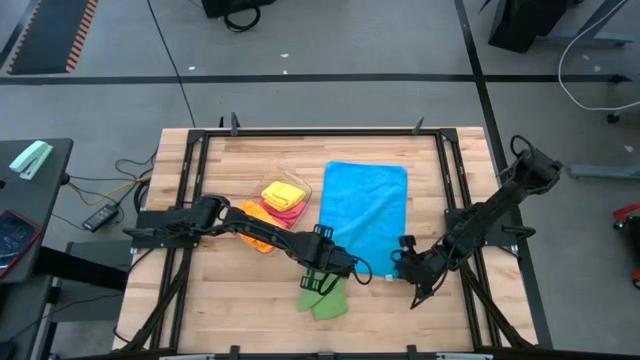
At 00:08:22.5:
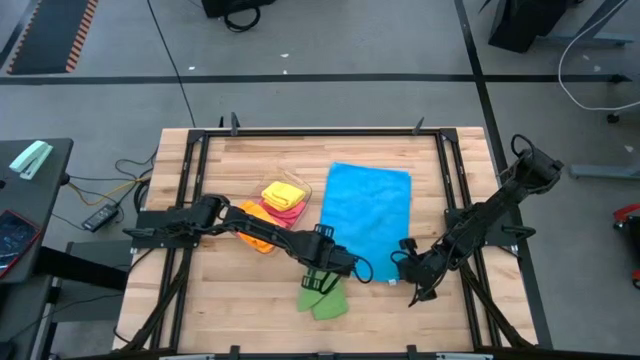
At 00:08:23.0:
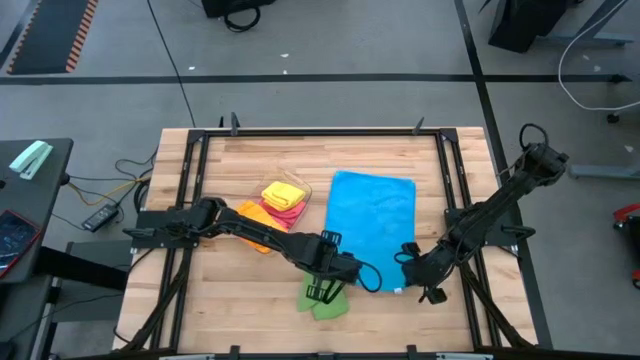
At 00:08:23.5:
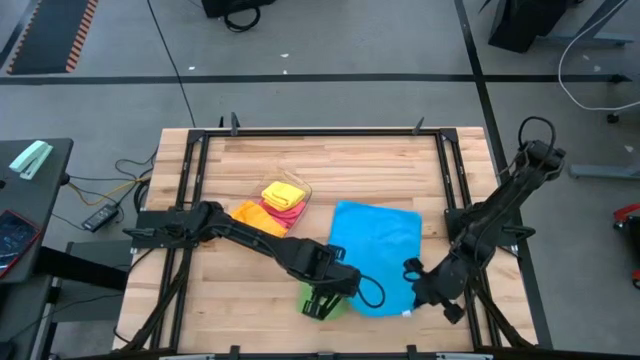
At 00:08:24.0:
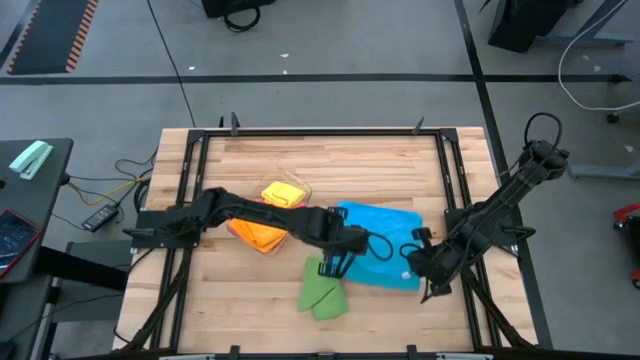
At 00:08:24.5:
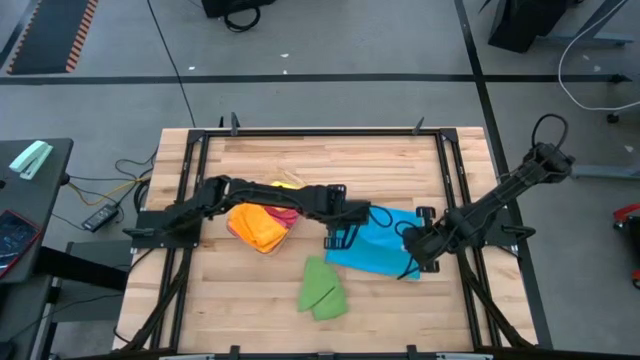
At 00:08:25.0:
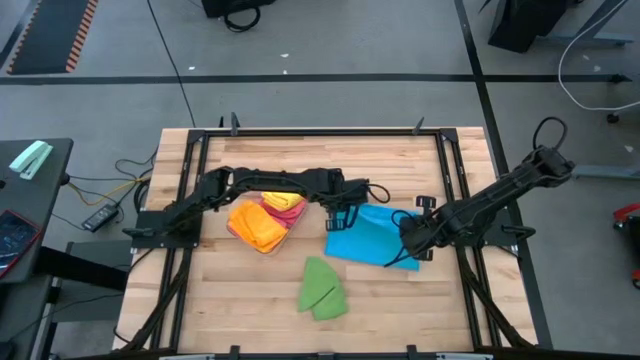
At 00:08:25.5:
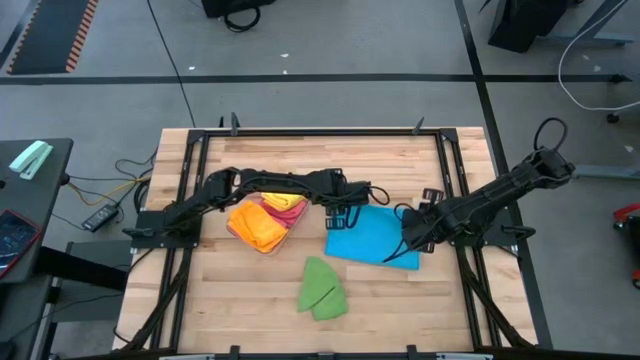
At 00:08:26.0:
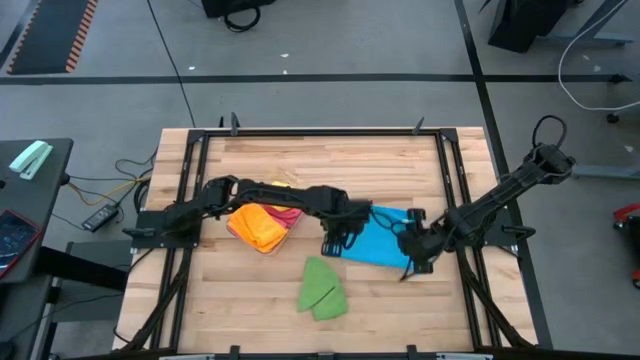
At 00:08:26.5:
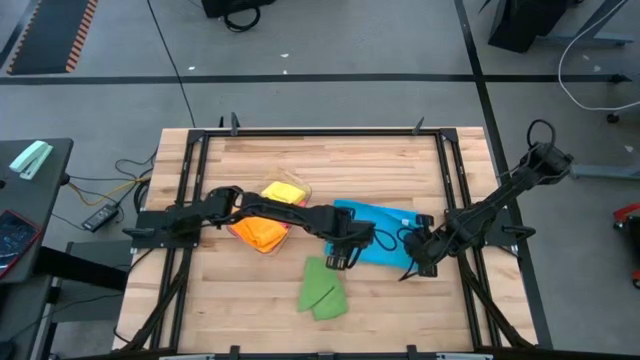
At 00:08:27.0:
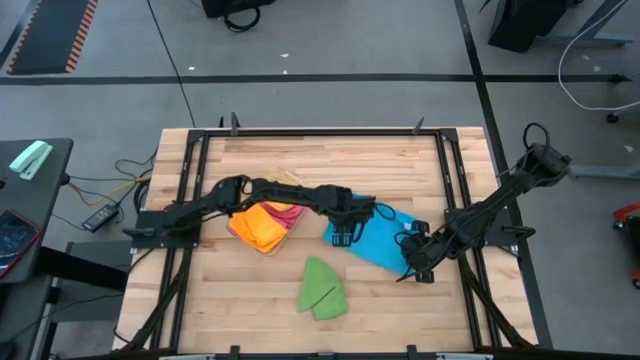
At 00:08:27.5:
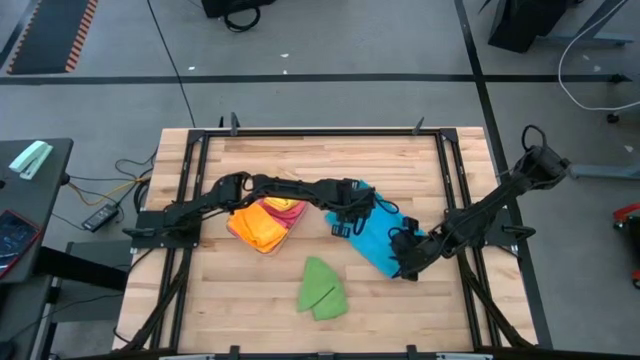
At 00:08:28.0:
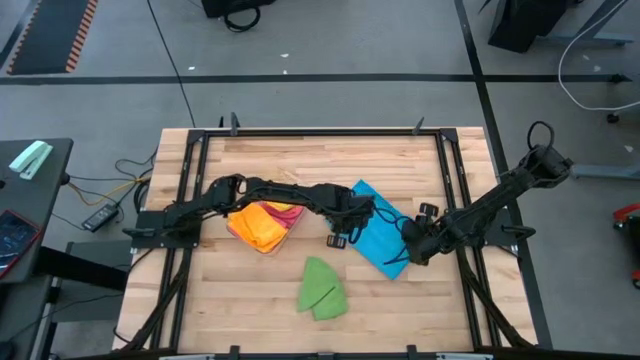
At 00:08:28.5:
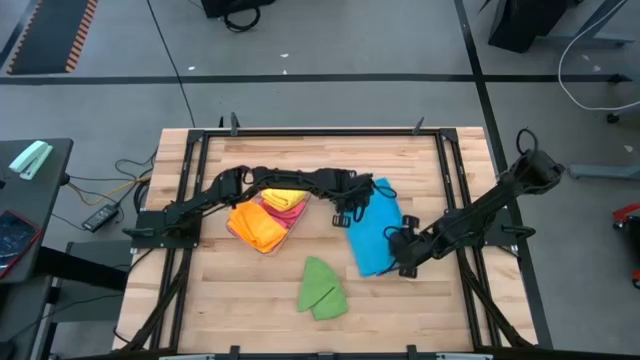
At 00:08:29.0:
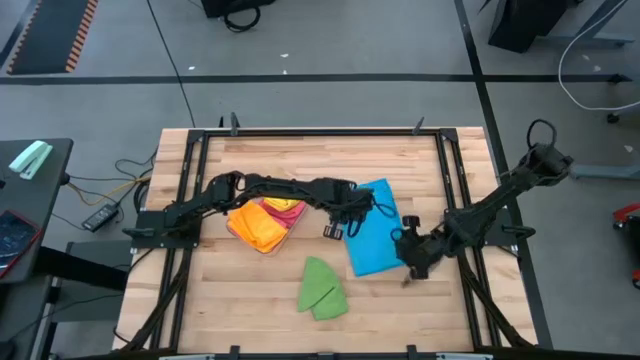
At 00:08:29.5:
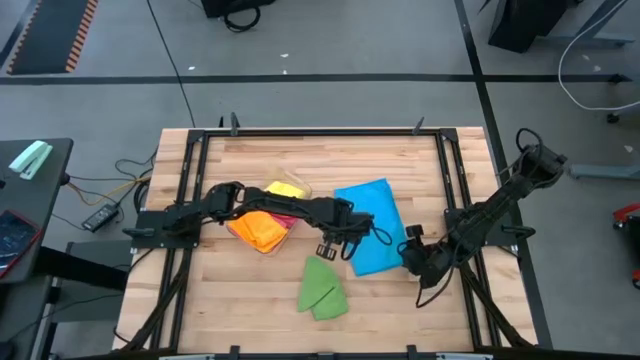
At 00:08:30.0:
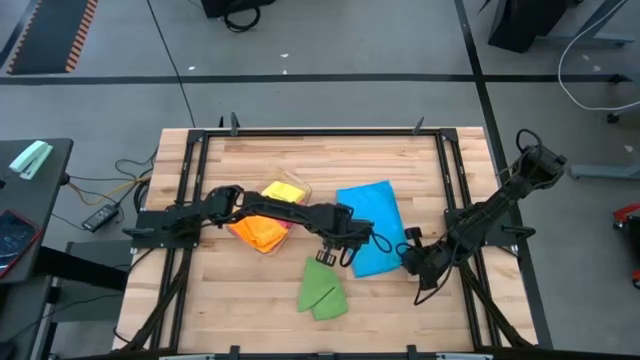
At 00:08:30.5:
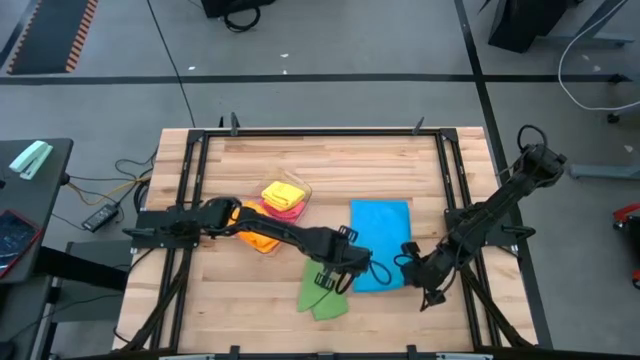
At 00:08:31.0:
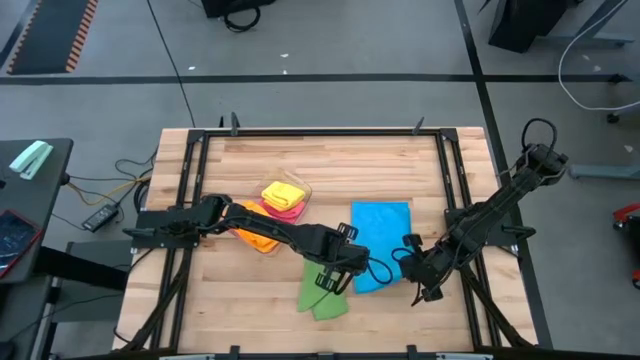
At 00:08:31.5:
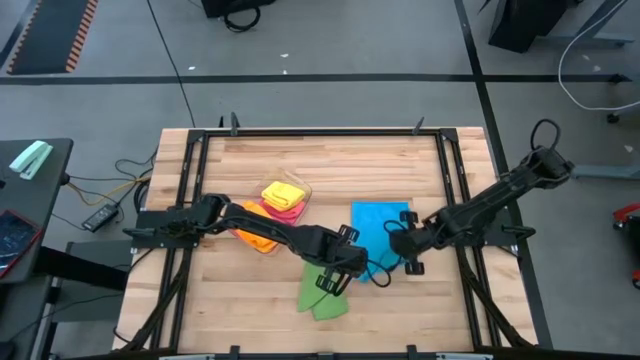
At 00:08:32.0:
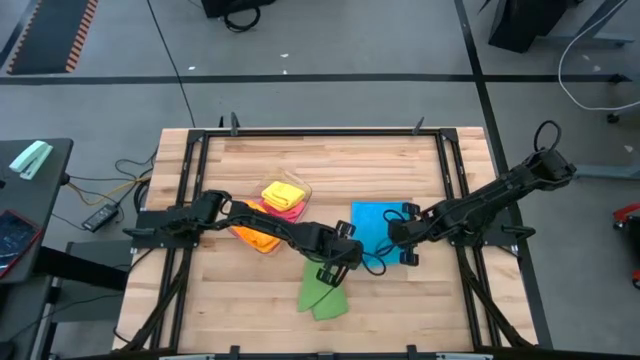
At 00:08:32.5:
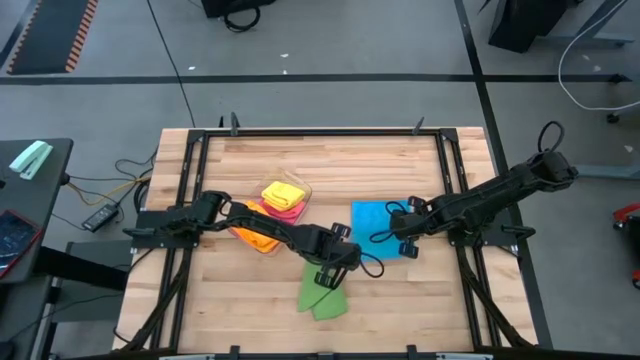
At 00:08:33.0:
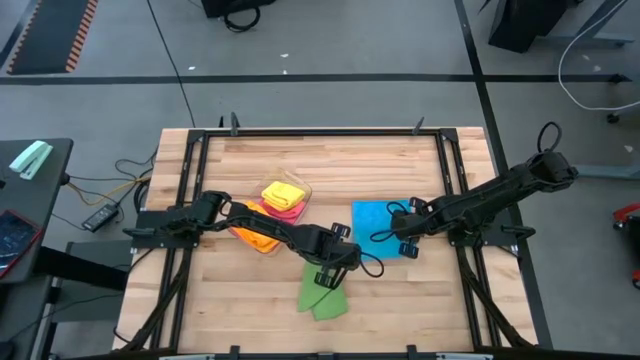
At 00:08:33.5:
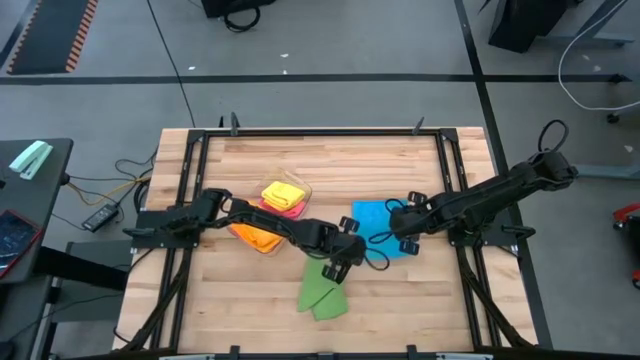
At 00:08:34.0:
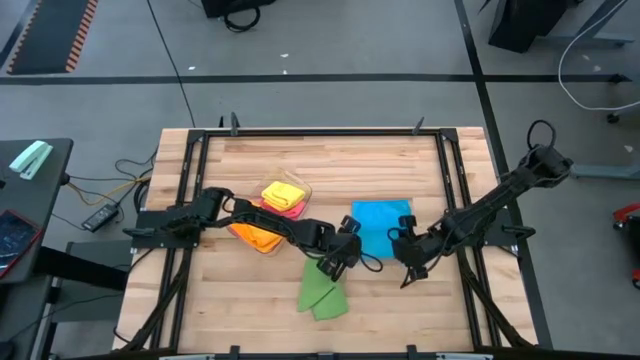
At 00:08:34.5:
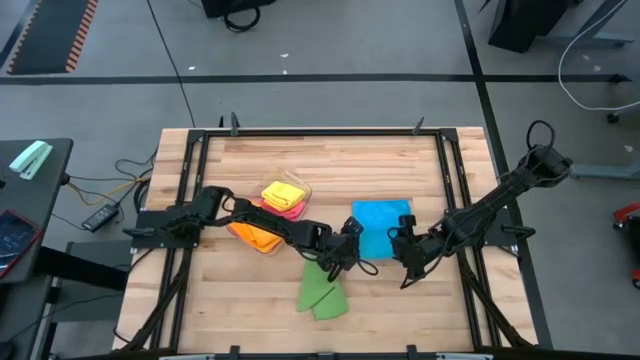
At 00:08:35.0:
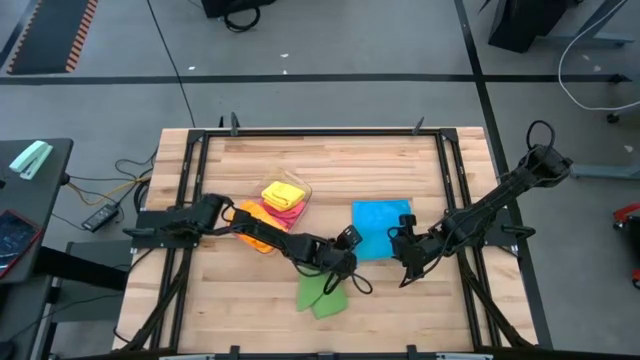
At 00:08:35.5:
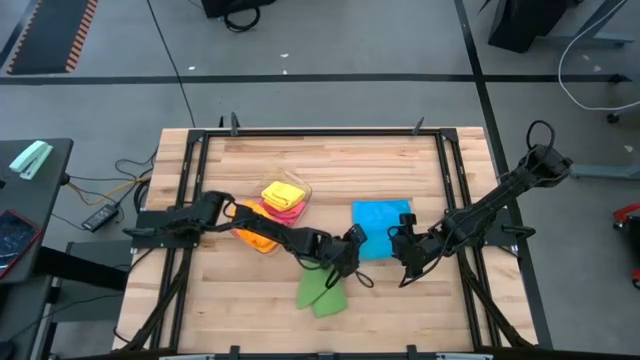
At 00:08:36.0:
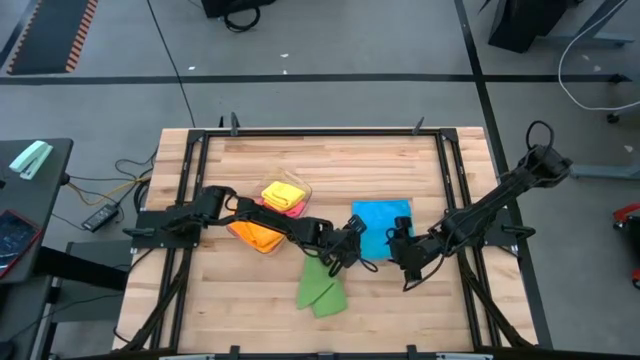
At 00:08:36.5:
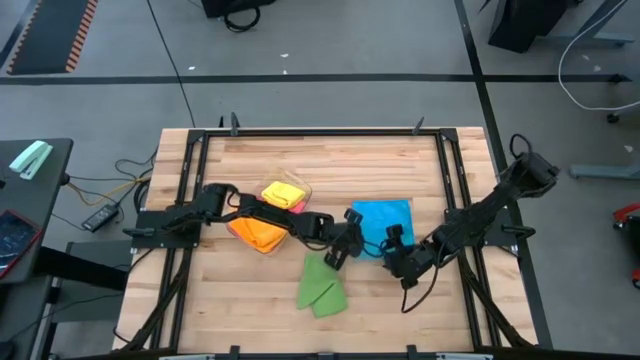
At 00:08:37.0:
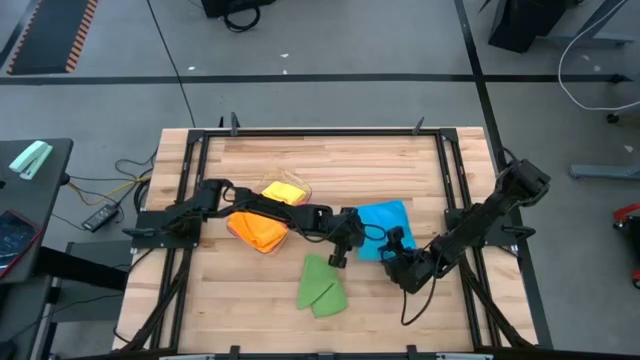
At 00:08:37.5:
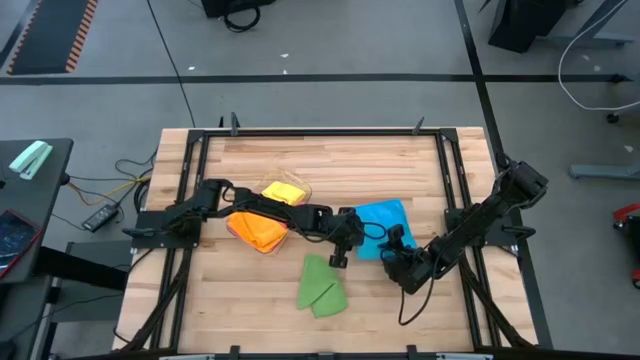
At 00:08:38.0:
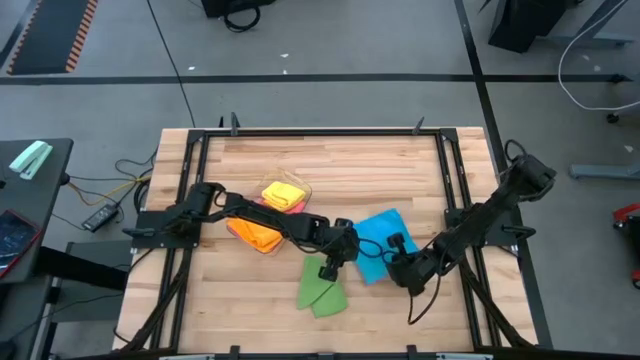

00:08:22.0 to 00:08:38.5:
Task: Fold microfiber towels
Fold the blue microfiber towel
